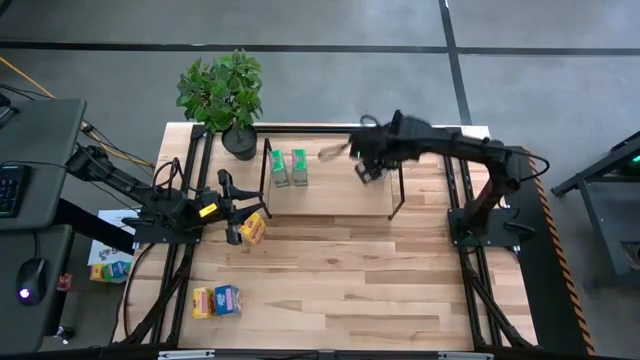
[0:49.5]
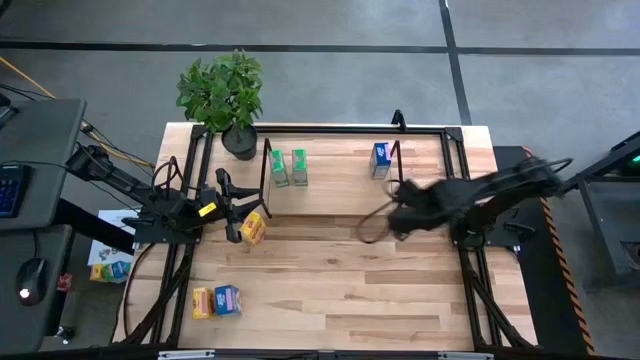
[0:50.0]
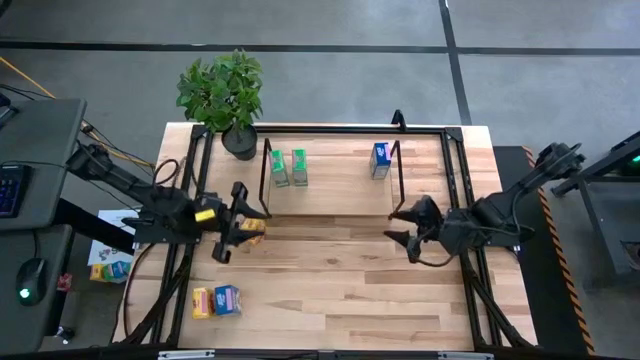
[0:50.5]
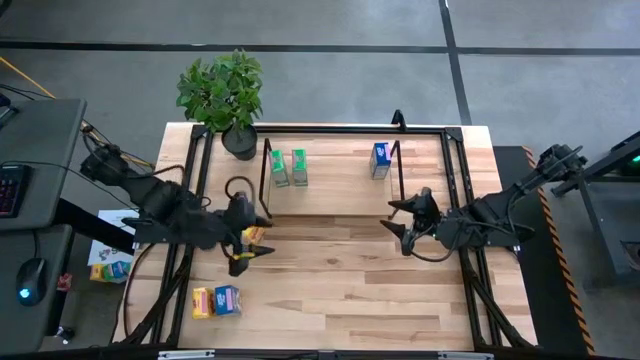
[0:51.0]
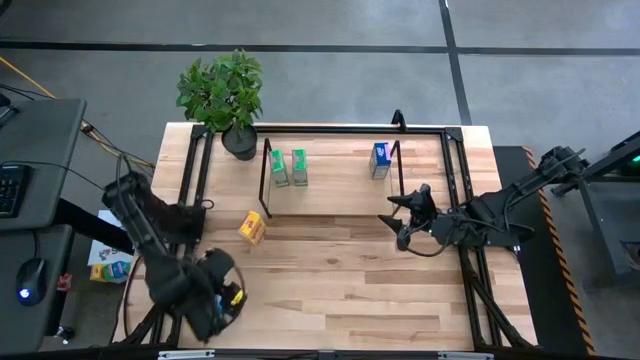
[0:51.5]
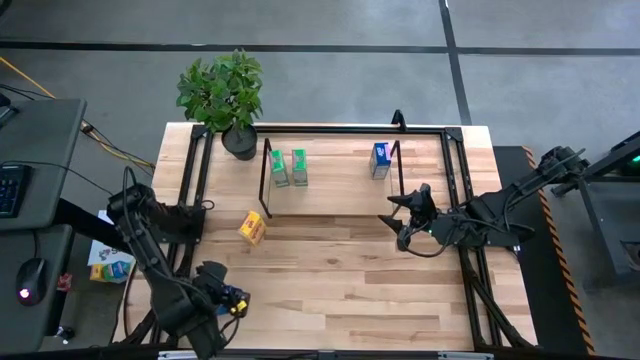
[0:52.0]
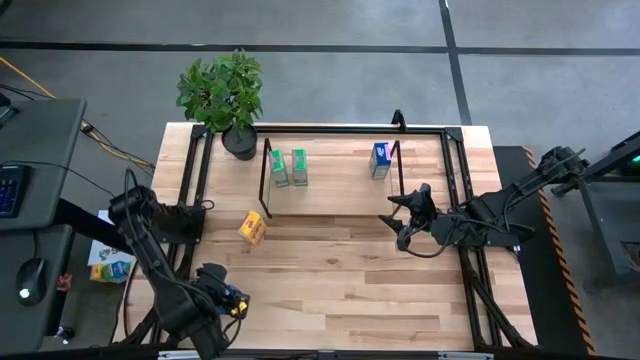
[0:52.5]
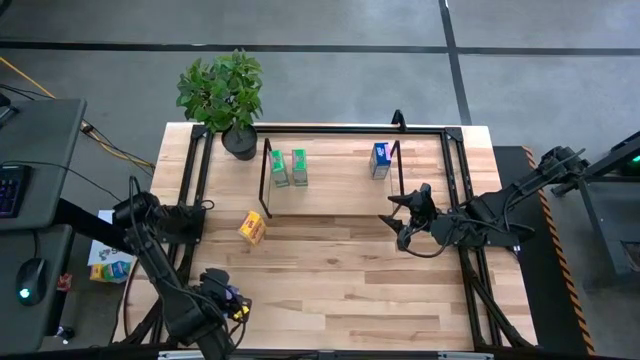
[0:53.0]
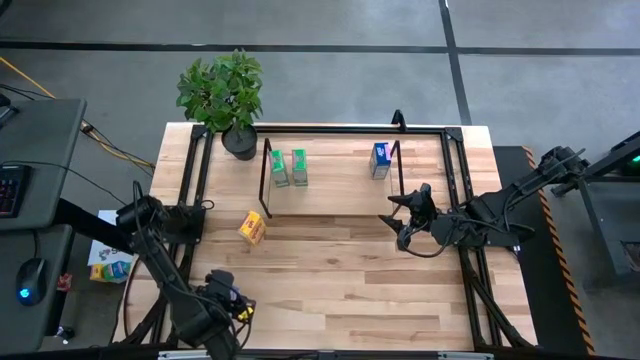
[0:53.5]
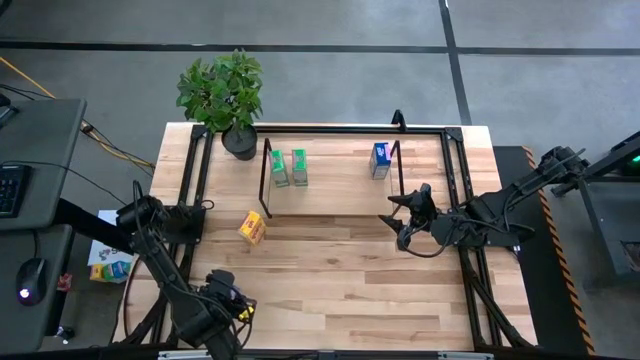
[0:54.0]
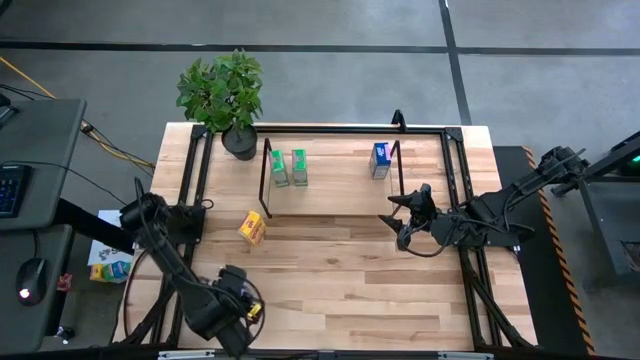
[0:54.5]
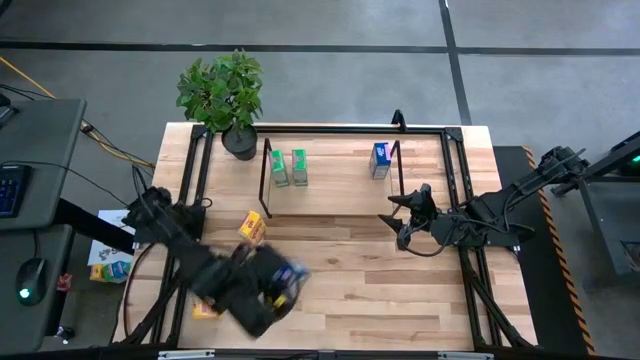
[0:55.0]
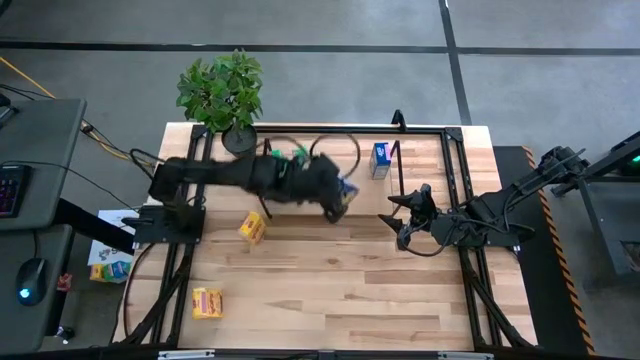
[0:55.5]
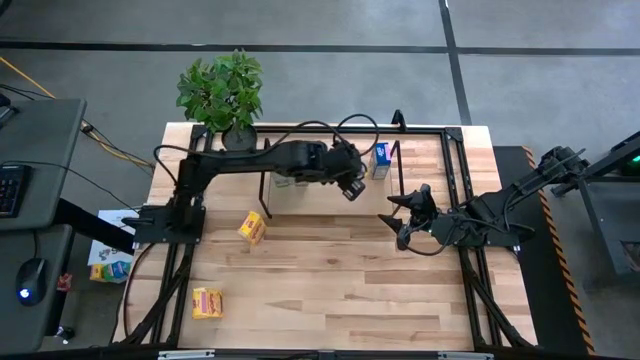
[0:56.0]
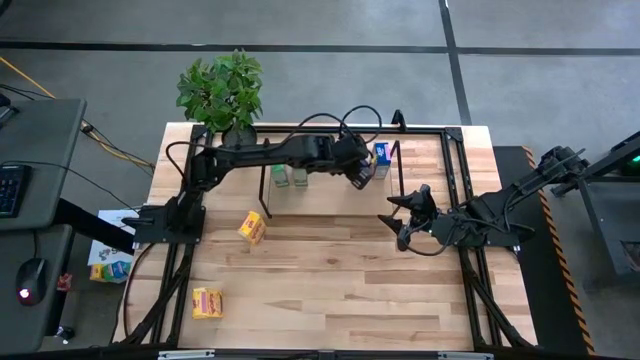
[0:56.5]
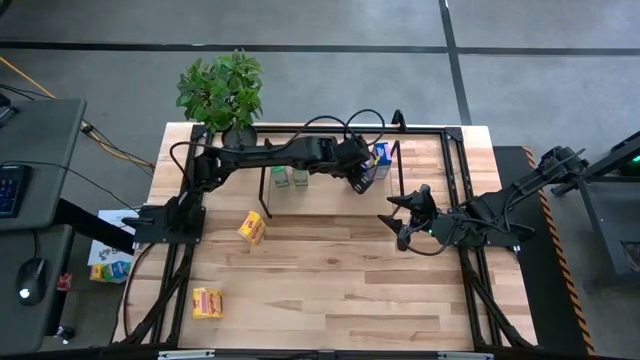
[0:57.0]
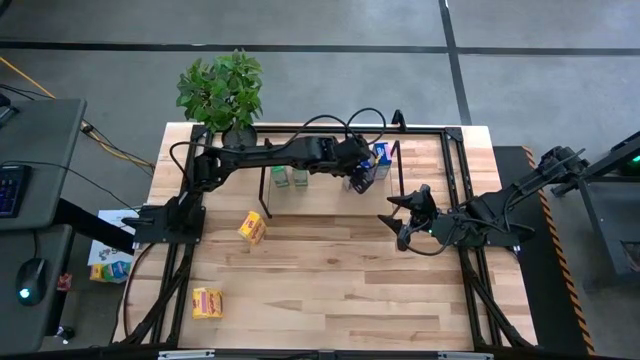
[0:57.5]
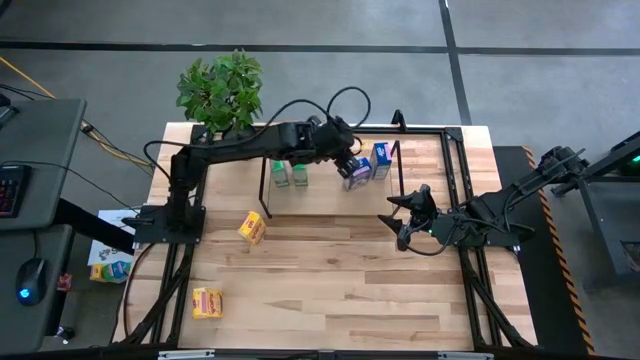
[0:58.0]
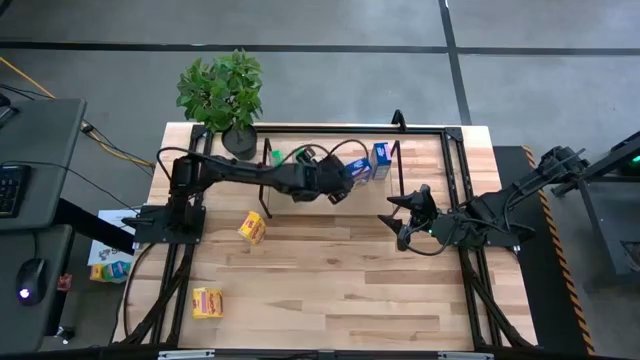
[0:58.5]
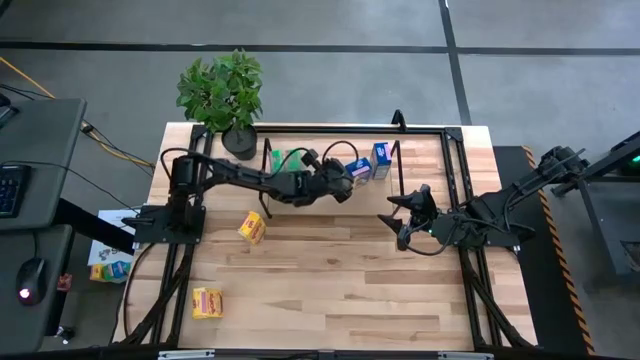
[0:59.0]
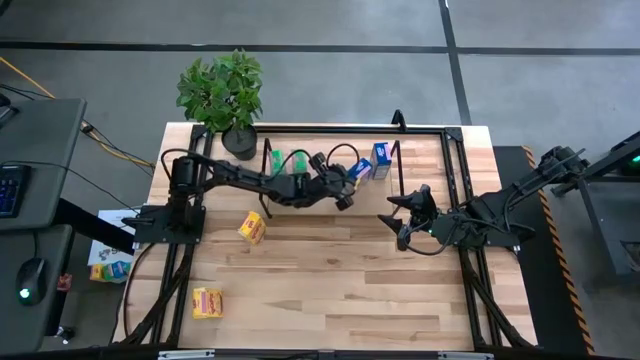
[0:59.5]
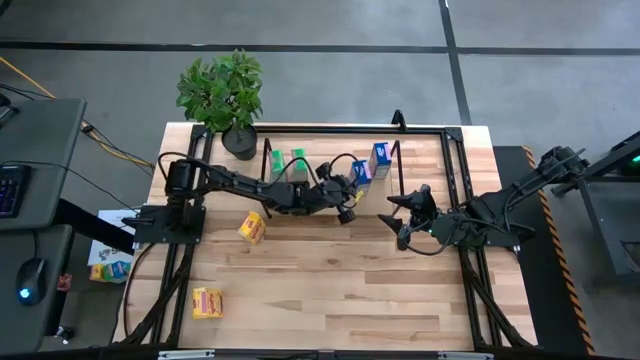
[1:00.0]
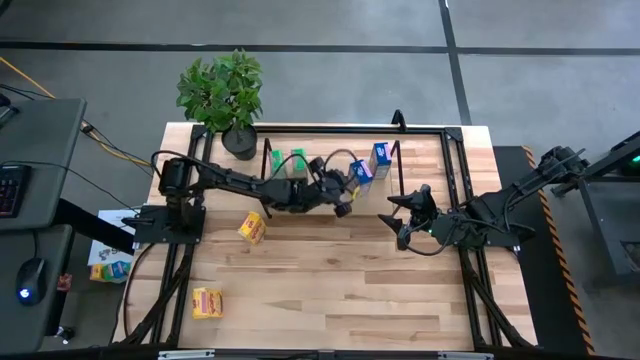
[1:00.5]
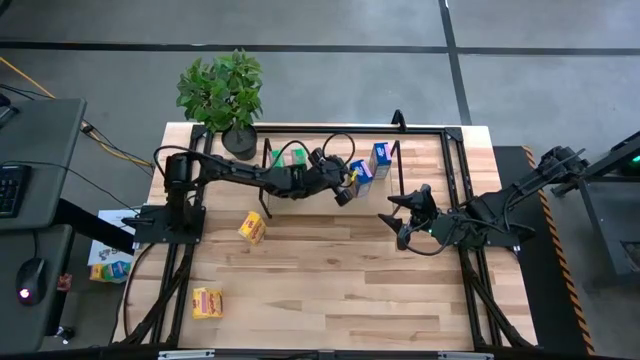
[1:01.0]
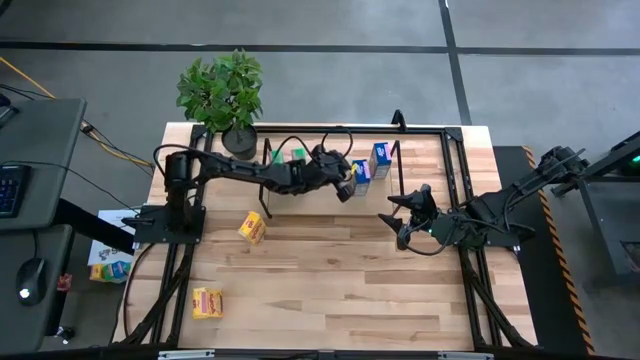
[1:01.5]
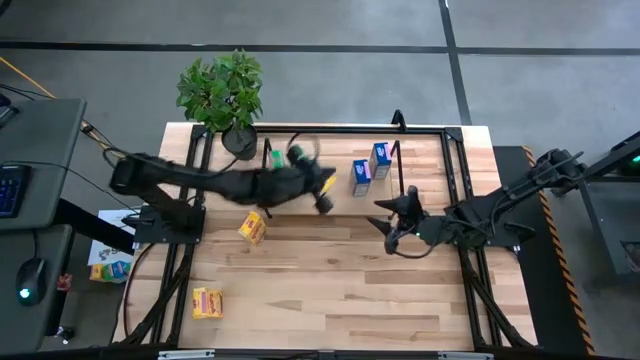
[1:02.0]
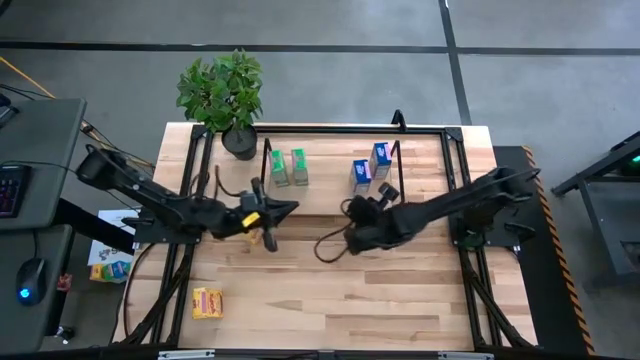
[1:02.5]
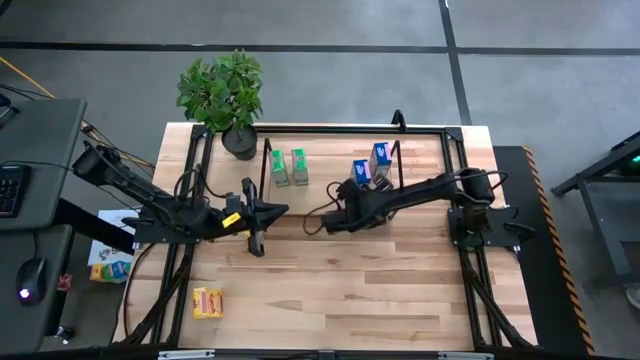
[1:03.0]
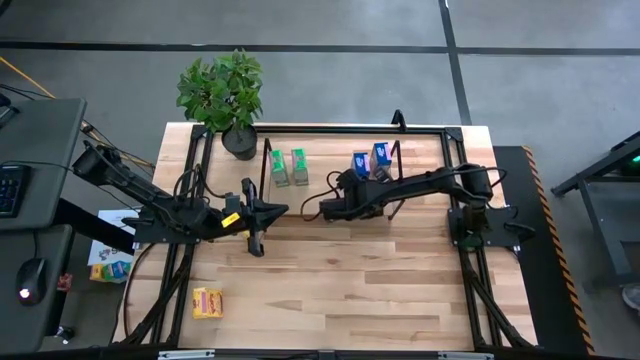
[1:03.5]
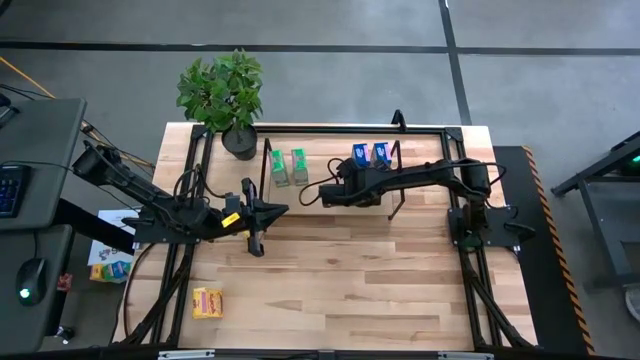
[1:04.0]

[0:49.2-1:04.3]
Task: Stack cereal on shelf
Put the blue cereal box aligned with the other blue cereal box on the shelf

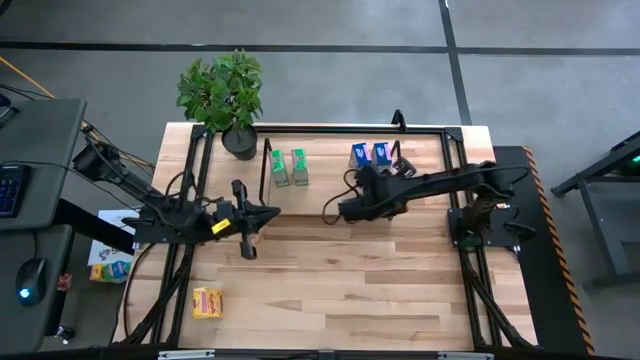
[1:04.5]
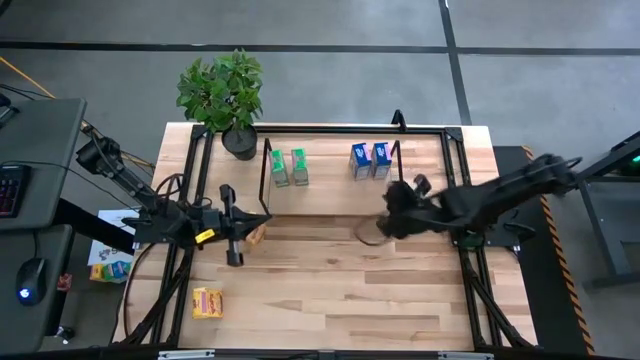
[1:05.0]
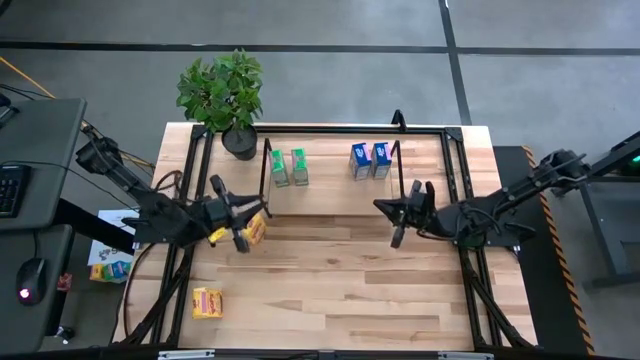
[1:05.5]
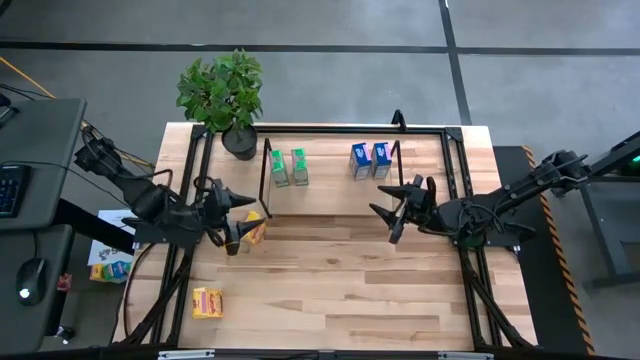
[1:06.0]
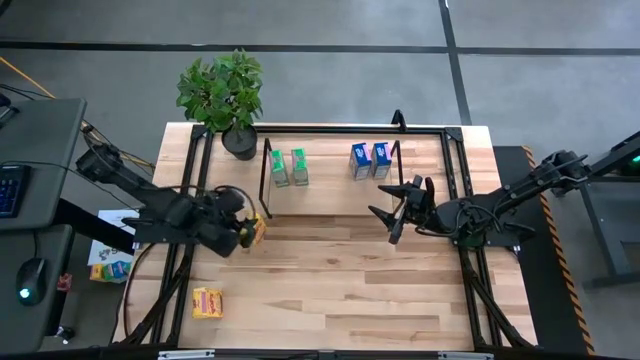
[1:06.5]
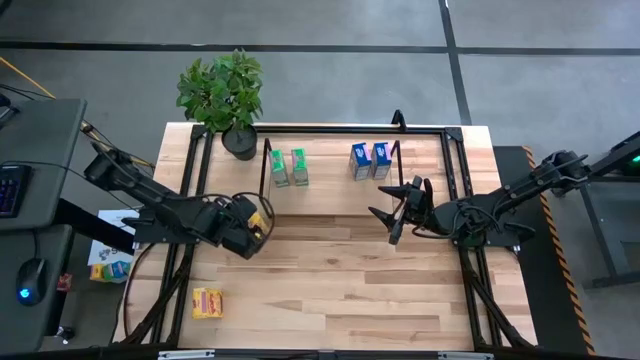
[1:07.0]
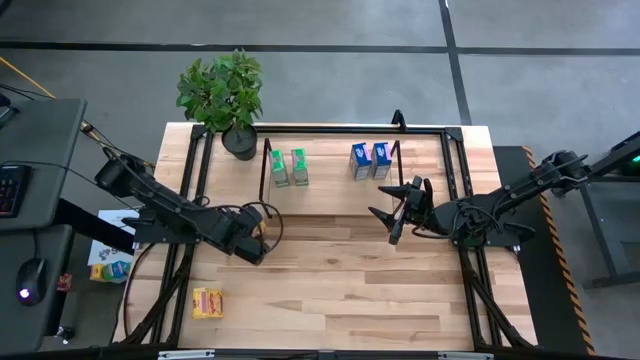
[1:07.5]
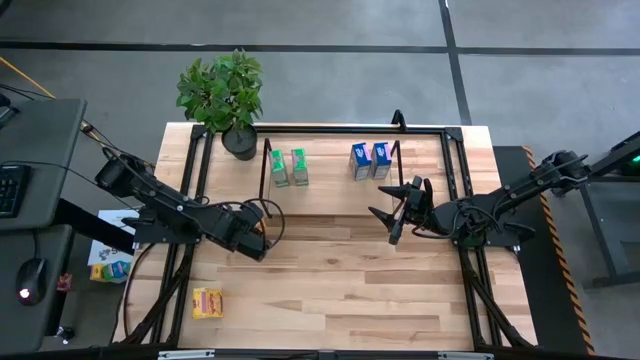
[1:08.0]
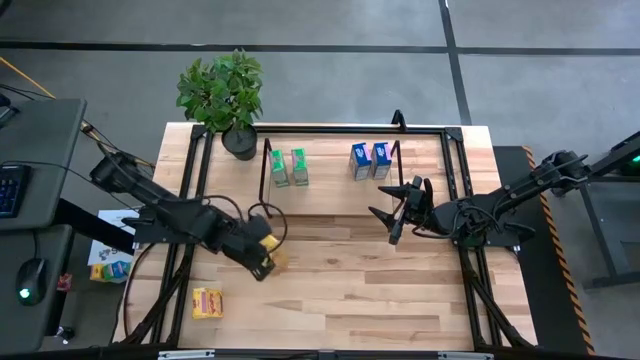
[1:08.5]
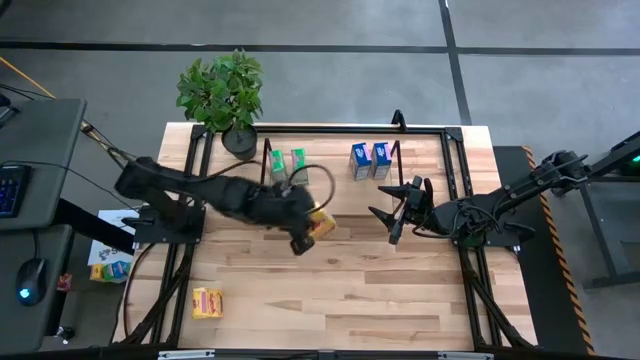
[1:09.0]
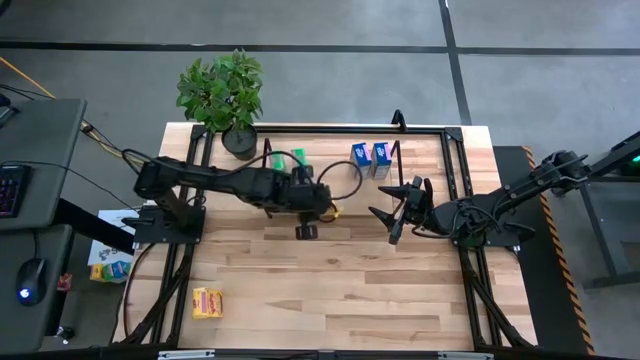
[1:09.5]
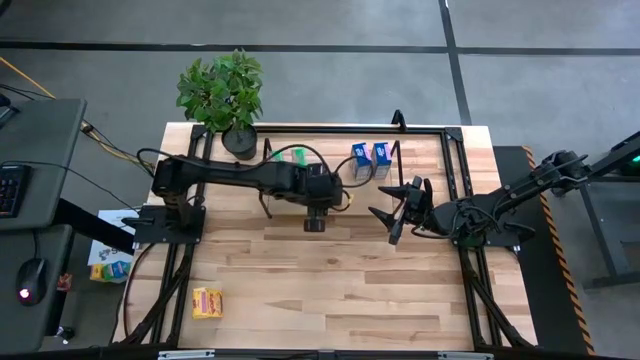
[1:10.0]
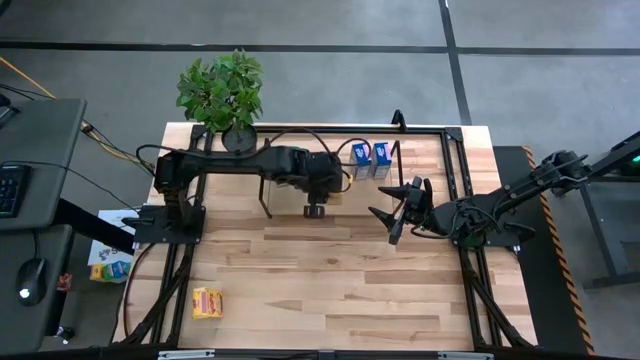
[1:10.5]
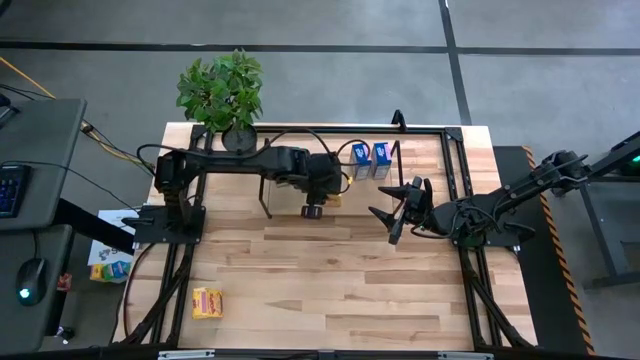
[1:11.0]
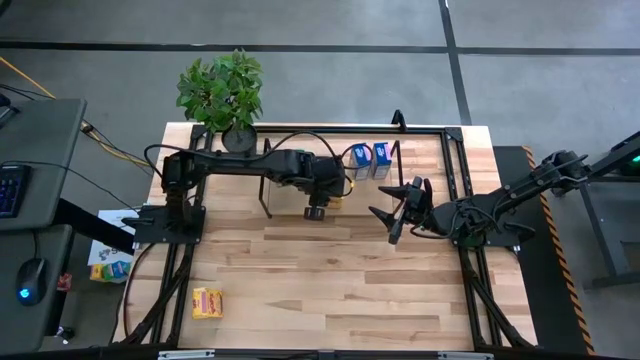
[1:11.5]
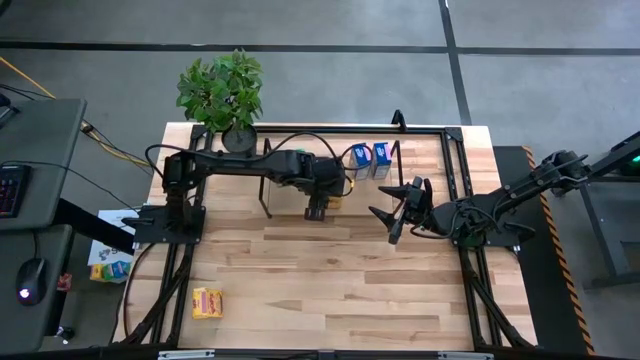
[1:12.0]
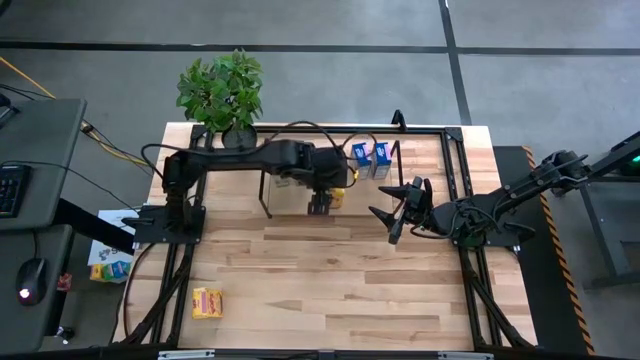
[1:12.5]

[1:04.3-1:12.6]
Put the top yellow cereal box on the shelf
